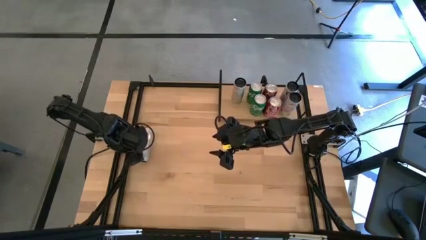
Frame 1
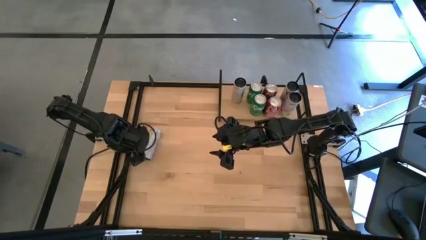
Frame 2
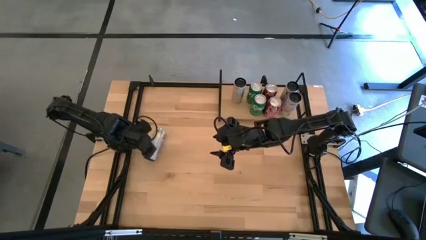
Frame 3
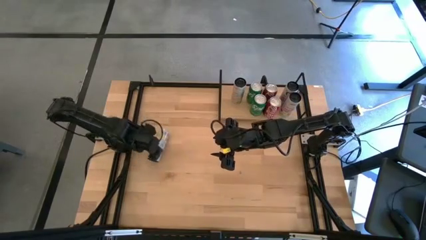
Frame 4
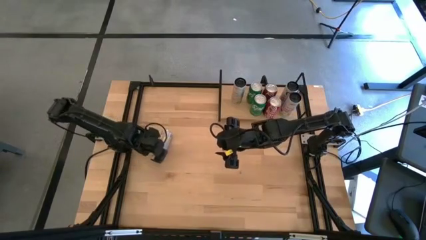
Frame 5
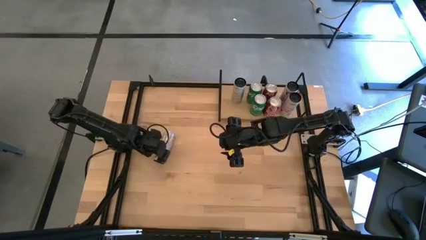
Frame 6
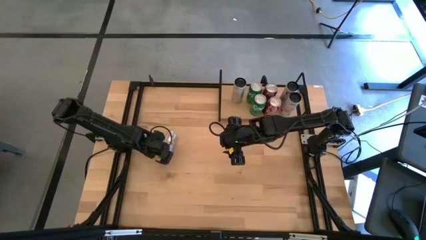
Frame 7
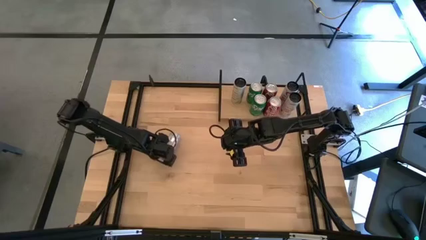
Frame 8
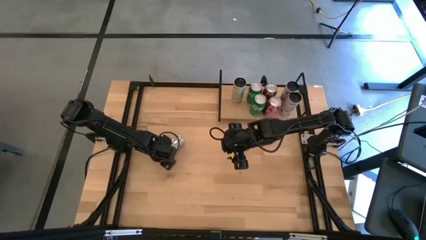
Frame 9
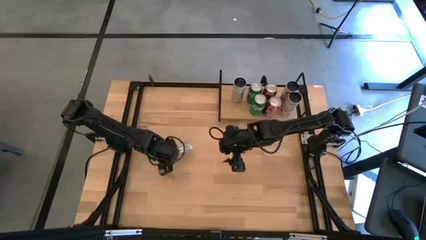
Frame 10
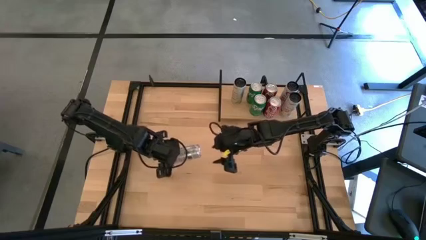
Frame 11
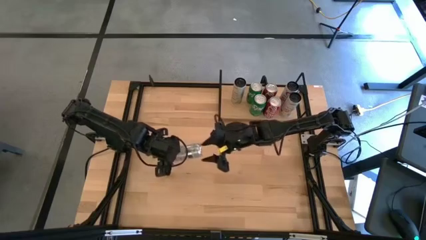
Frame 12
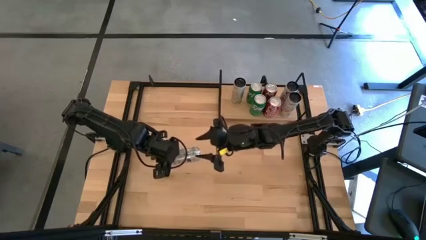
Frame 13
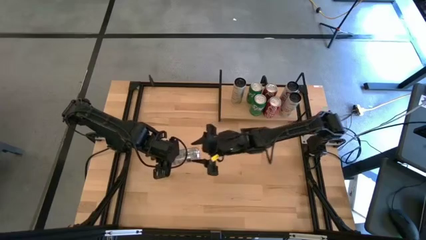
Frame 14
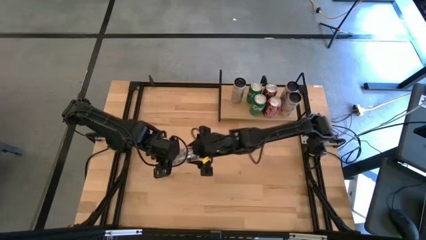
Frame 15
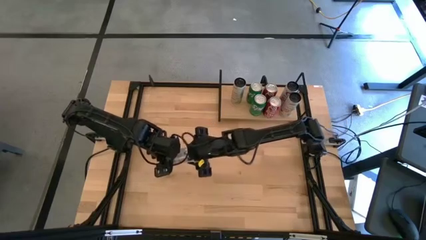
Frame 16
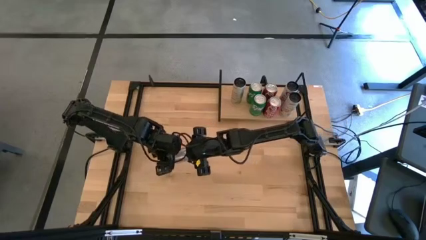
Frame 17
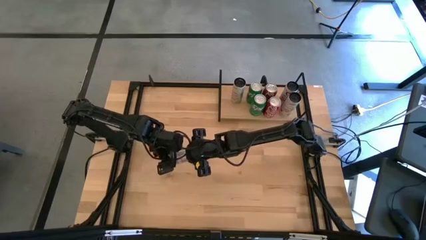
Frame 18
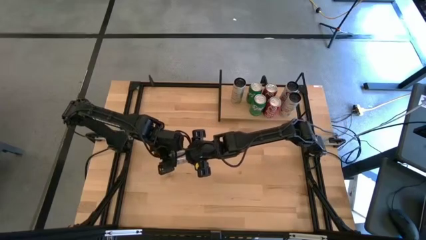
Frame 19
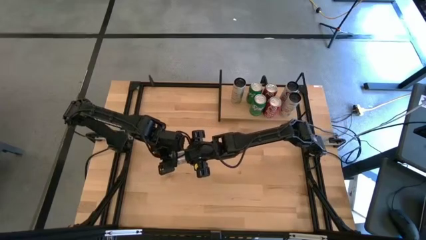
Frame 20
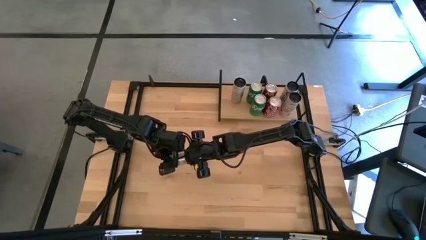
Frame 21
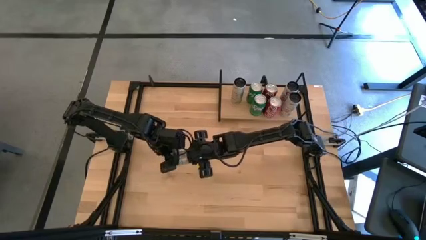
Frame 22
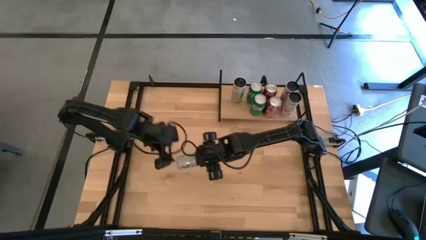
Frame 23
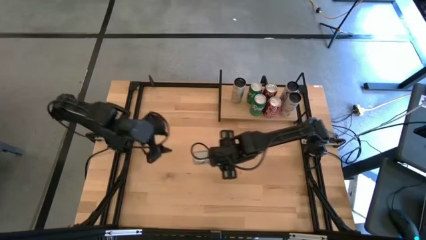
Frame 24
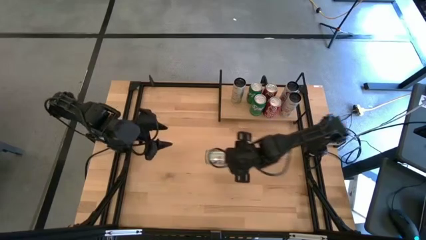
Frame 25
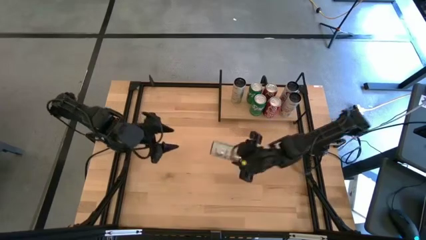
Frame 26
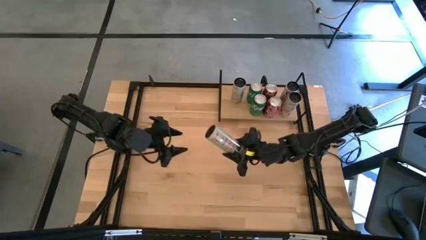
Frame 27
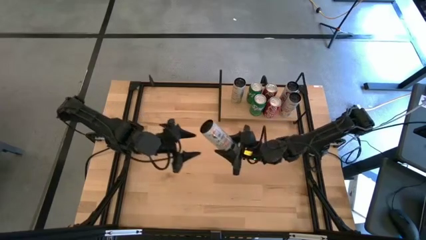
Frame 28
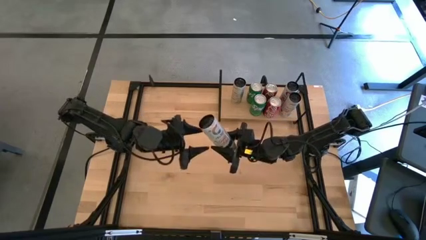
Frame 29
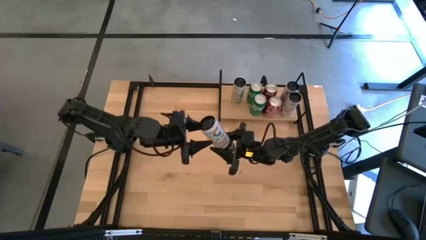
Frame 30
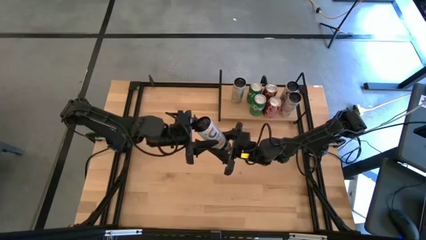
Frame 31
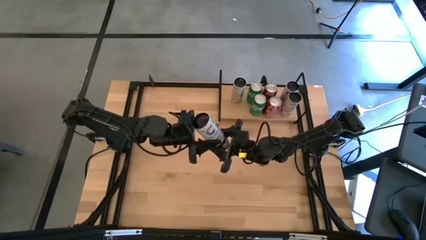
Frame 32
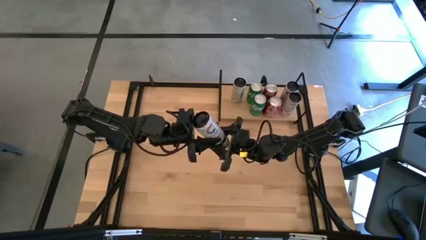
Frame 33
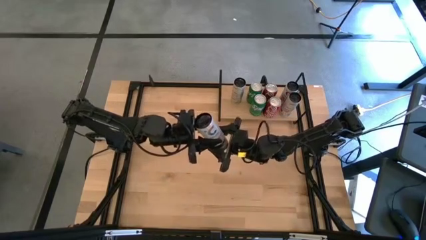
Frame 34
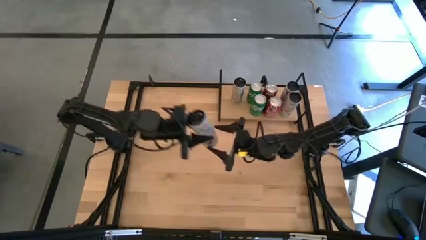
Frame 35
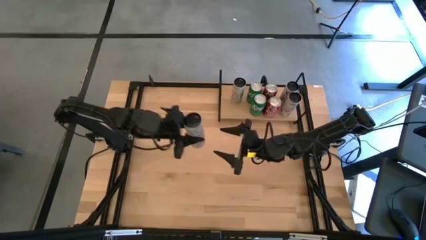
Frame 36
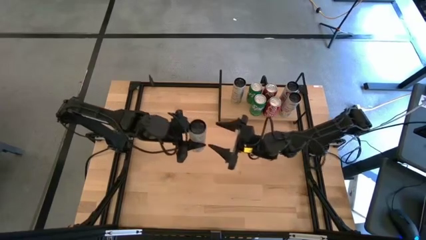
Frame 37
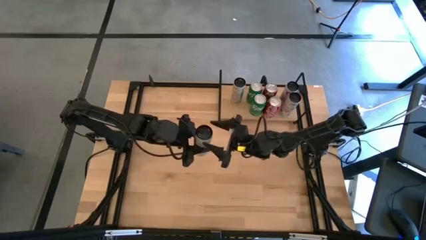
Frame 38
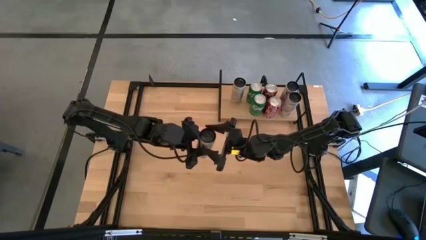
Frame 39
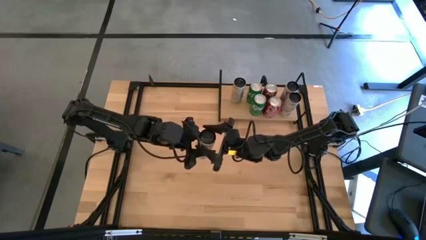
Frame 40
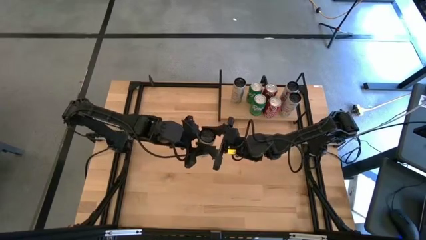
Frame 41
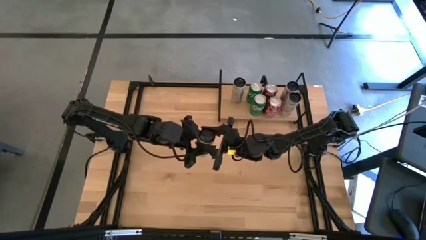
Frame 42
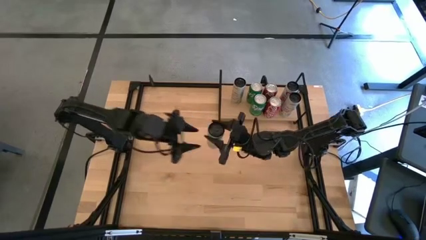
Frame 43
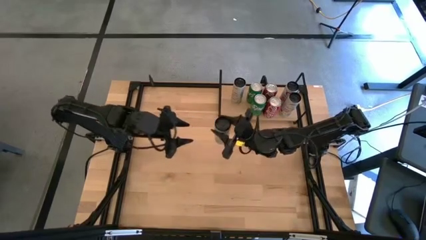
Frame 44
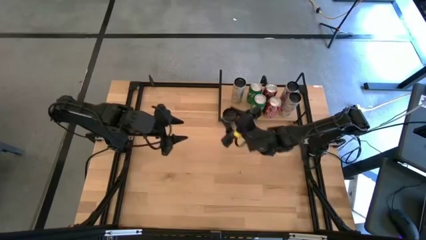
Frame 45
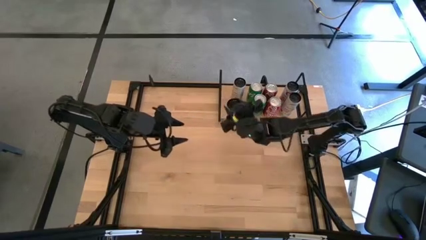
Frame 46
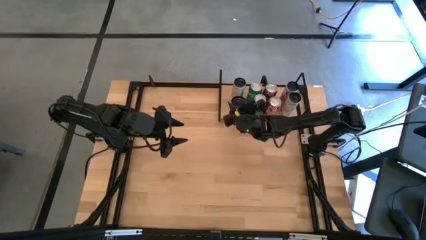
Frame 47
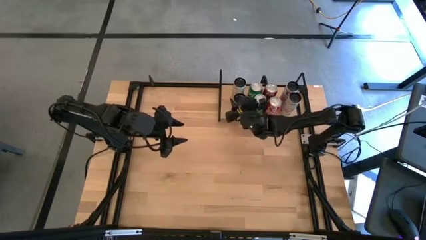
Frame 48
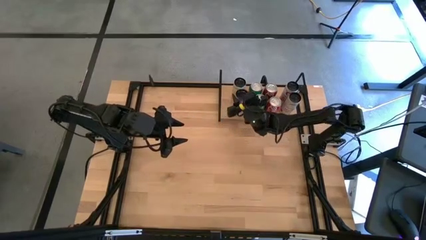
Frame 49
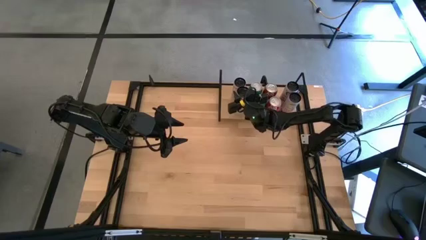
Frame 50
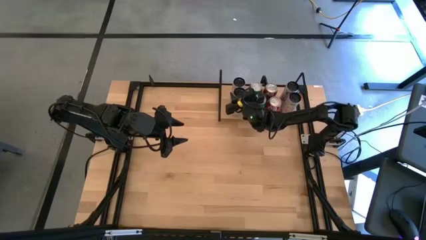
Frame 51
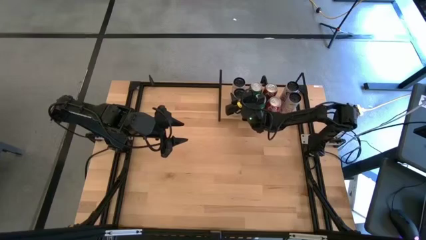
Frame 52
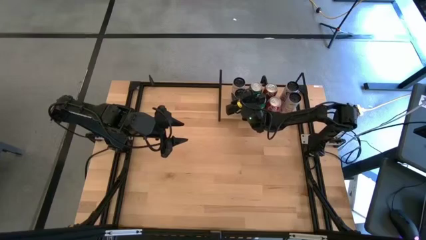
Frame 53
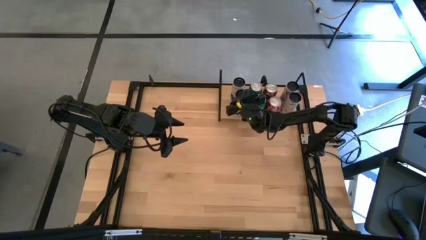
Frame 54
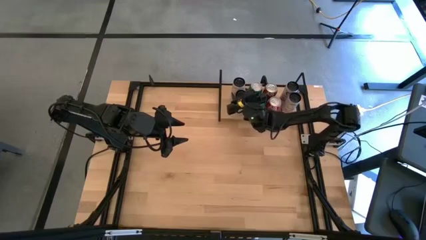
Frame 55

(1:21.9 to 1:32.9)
Task: Place canned beverage on shelf
Put the top white yellow soda can on the shelf aligned with the other white yellow soda can

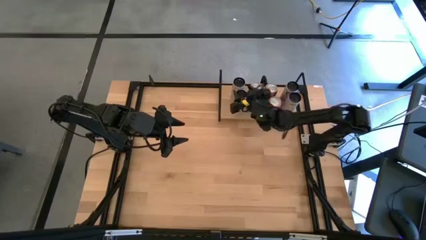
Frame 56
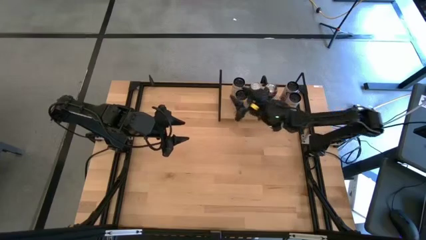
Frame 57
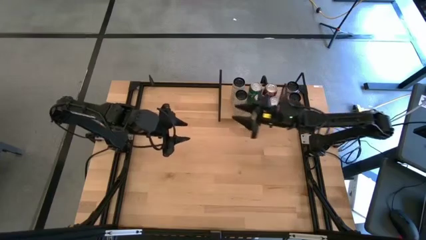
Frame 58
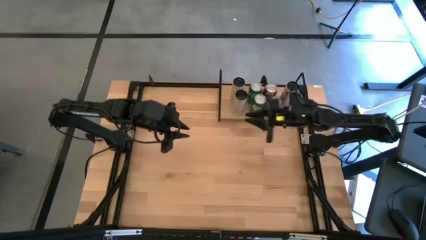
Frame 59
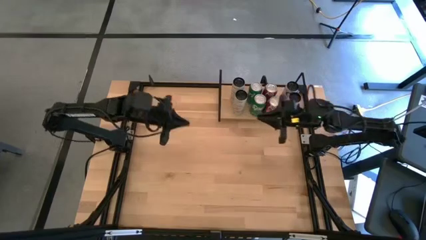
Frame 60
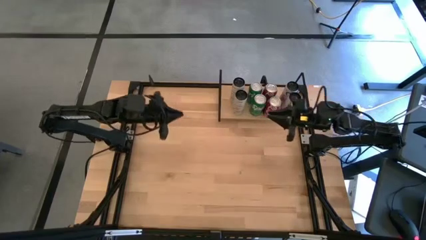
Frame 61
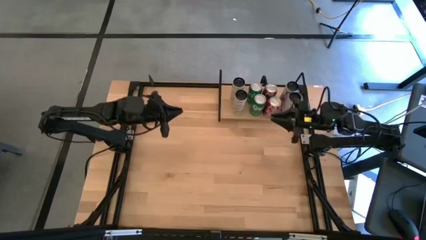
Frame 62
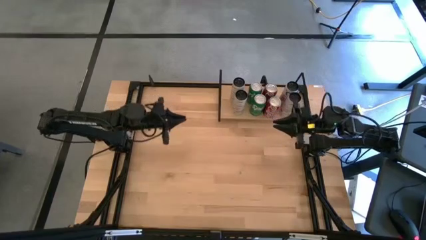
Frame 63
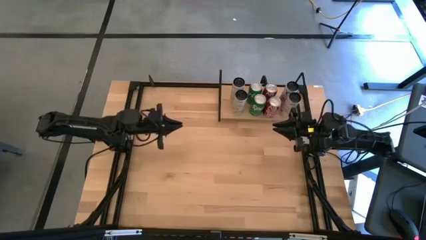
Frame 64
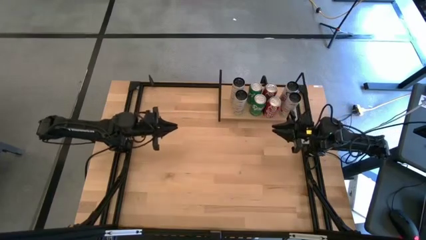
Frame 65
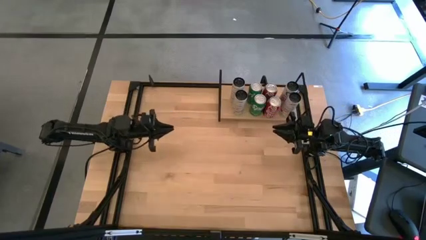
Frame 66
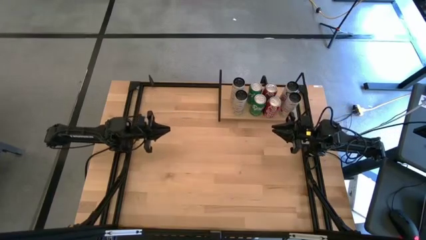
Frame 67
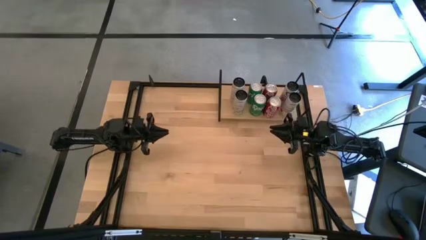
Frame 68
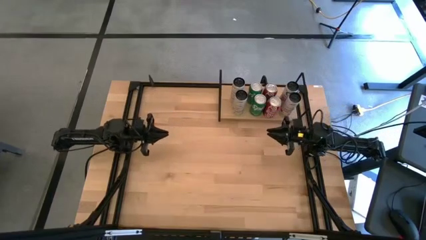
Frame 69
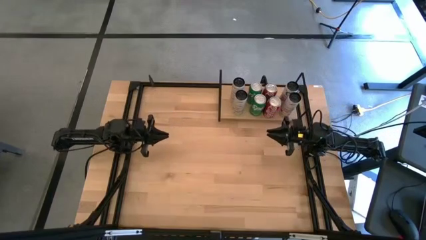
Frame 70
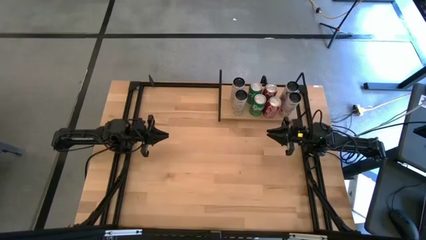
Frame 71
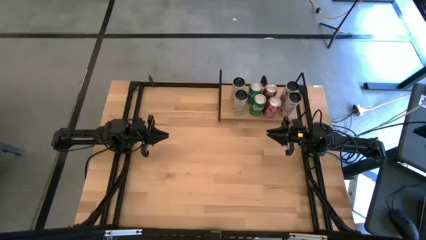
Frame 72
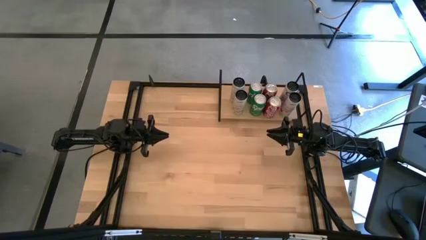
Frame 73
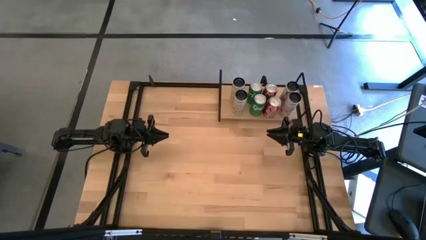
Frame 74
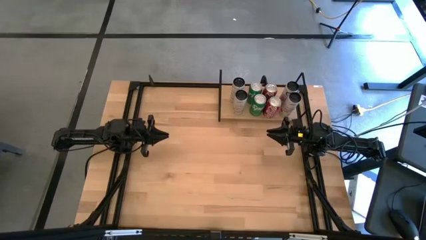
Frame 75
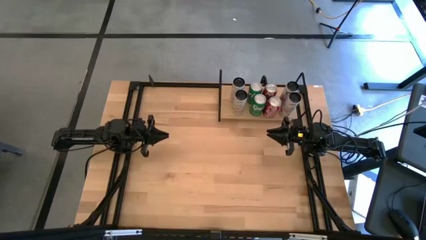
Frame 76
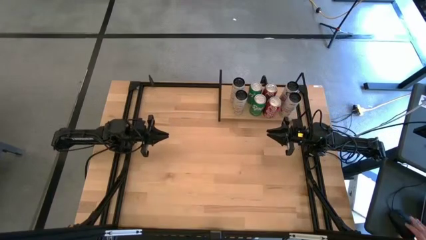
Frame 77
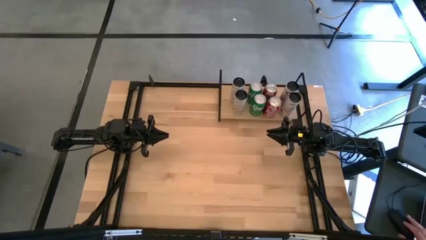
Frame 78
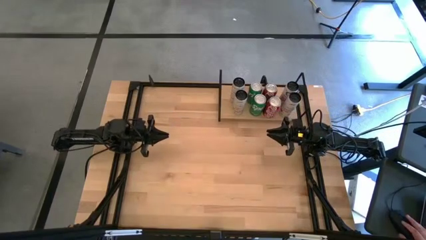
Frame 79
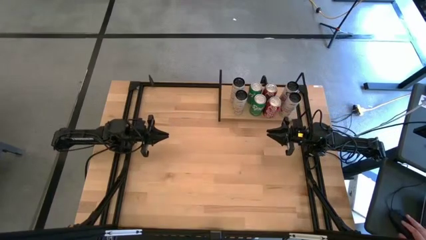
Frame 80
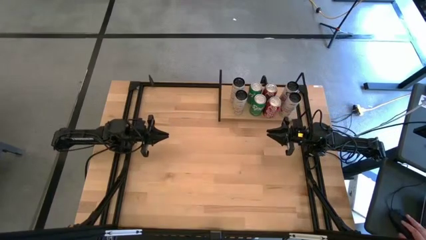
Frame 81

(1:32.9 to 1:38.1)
Return to Home Position
